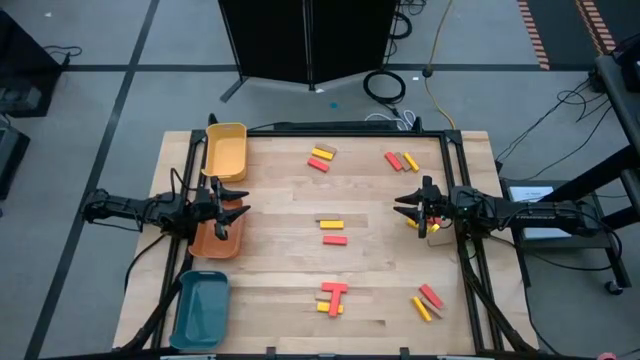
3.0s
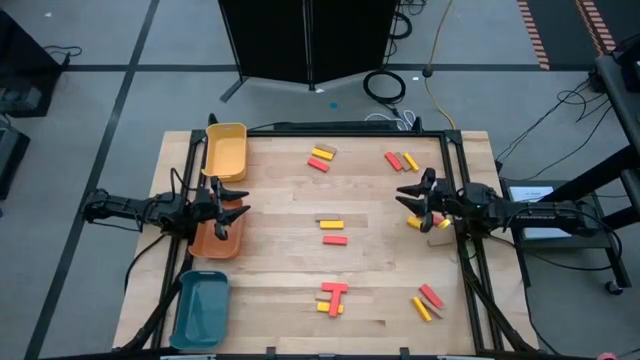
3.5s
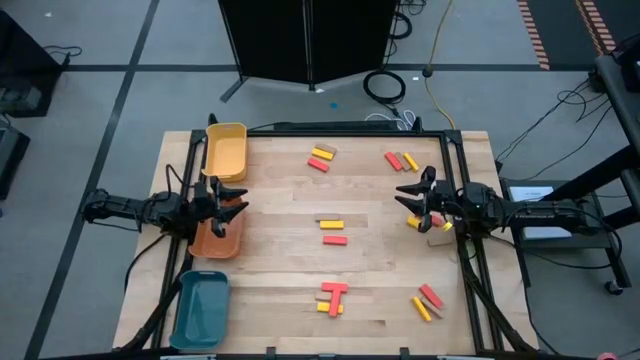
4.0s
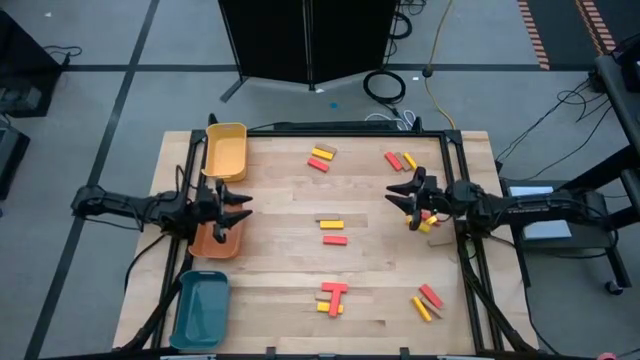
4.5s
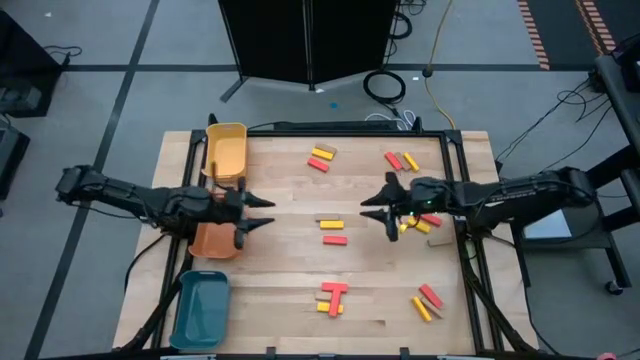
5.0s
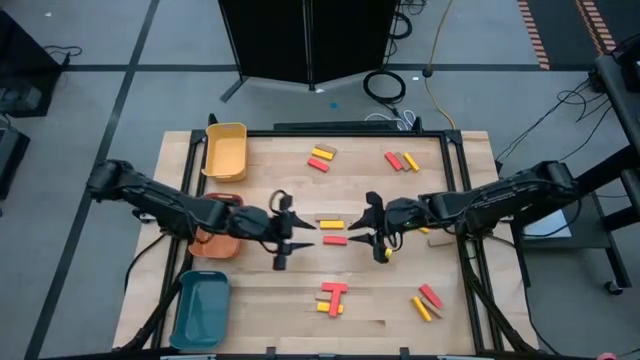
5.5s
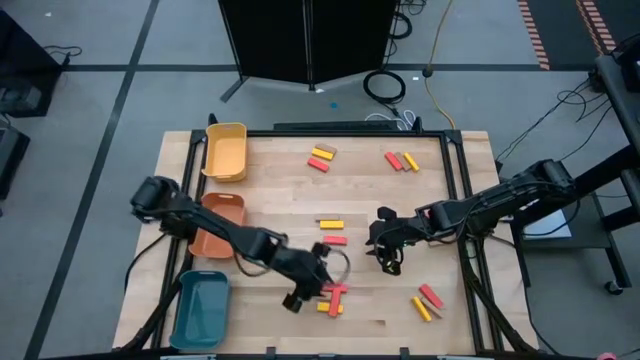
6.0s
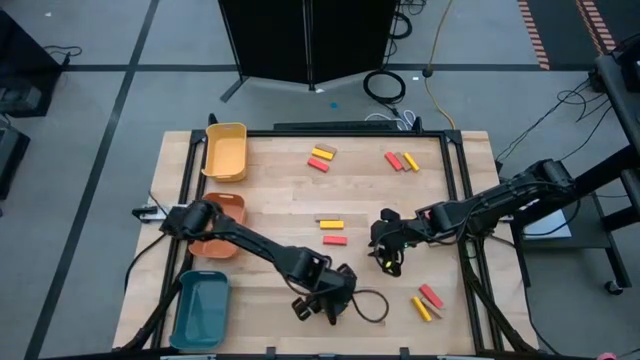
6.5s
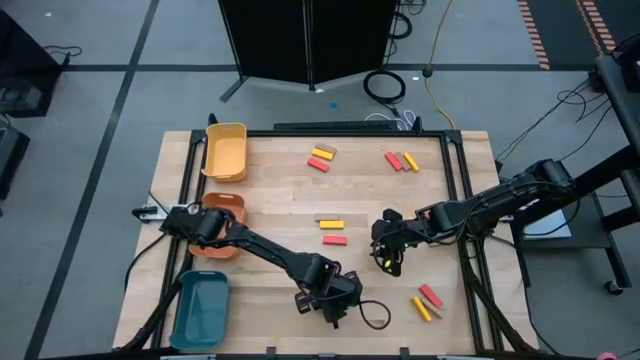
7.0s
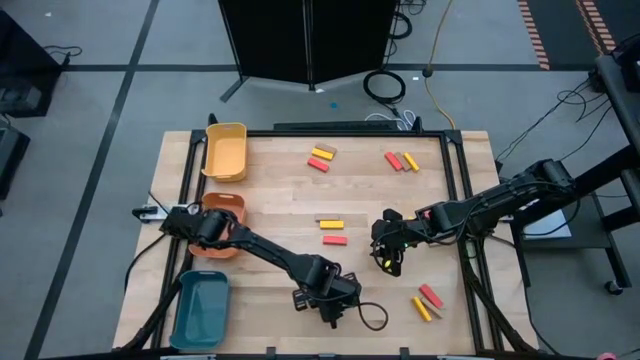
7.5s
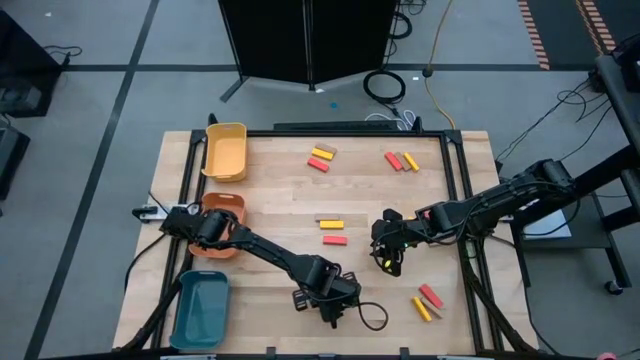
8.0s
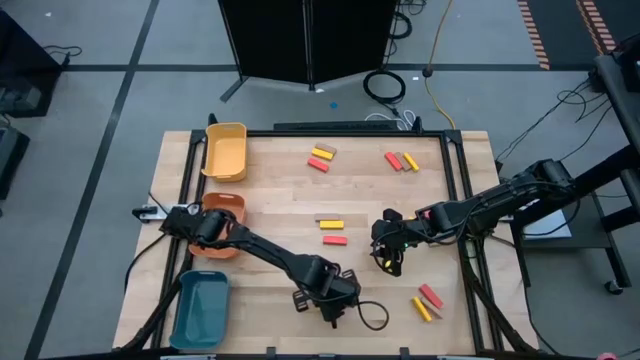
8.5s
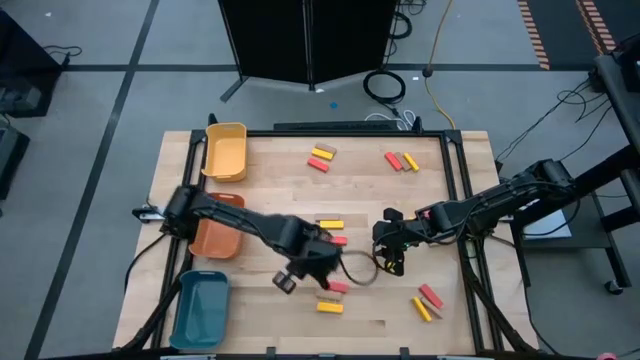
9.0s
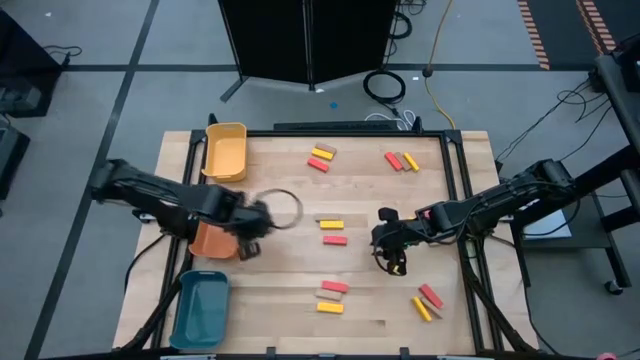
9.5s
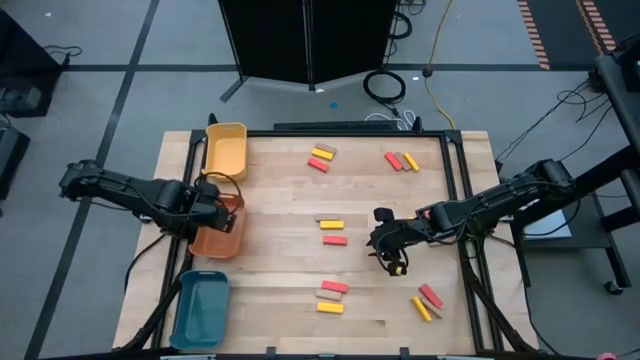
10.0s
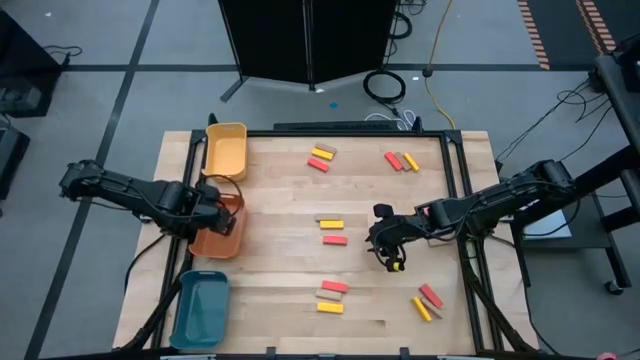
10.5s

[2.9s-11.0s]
Task: Sort blocks
Put the bottom left red block in the orange bin

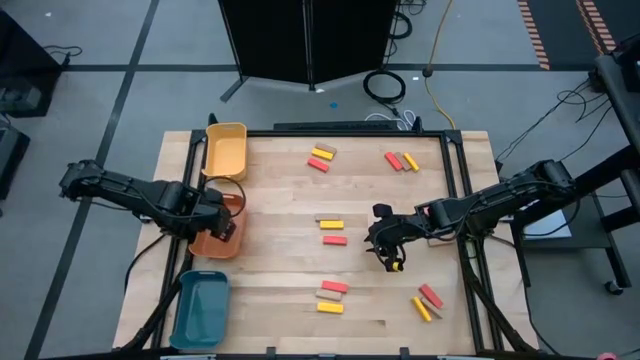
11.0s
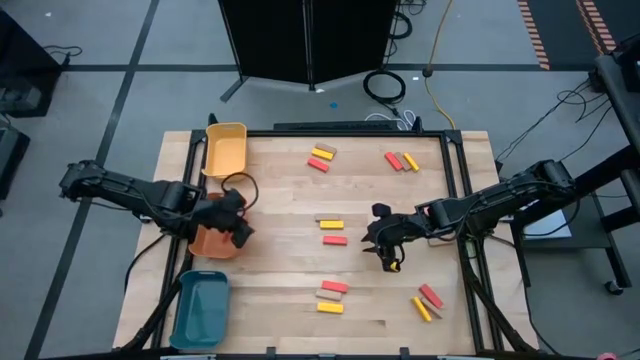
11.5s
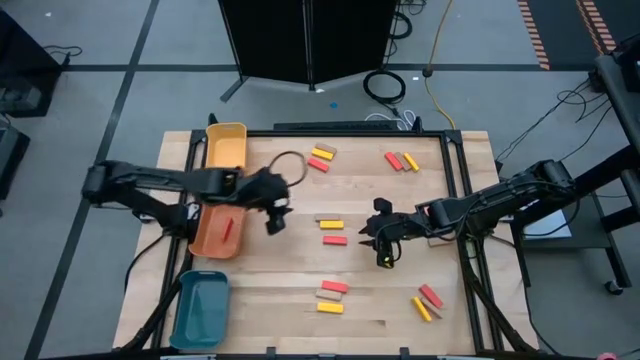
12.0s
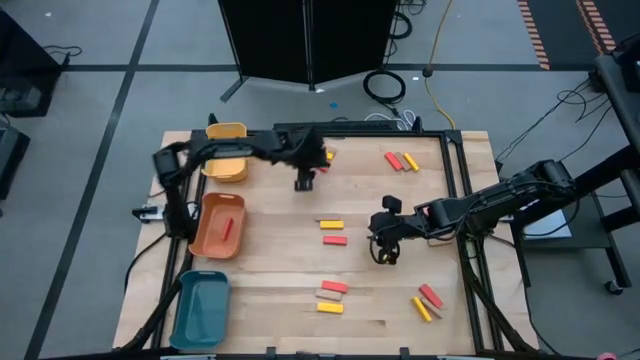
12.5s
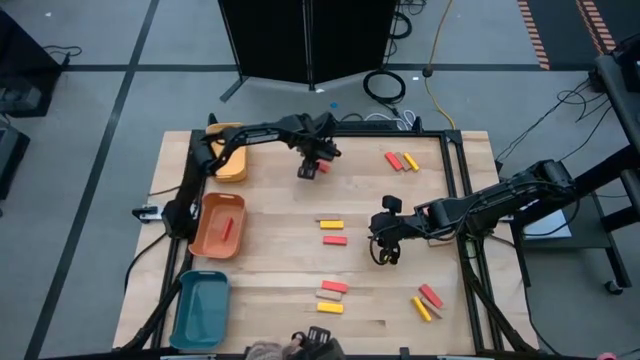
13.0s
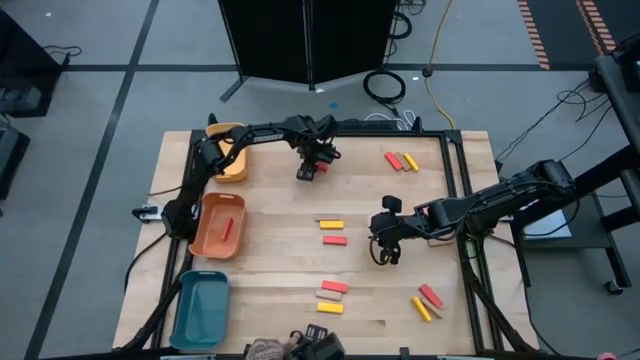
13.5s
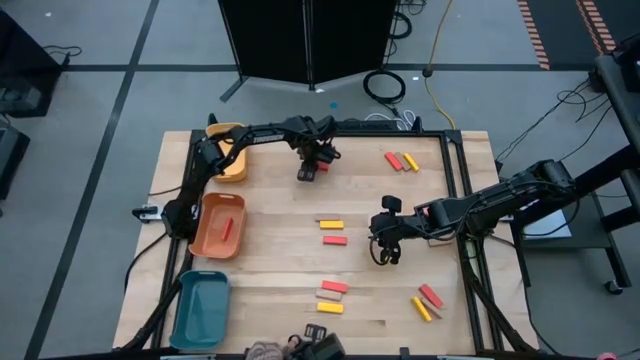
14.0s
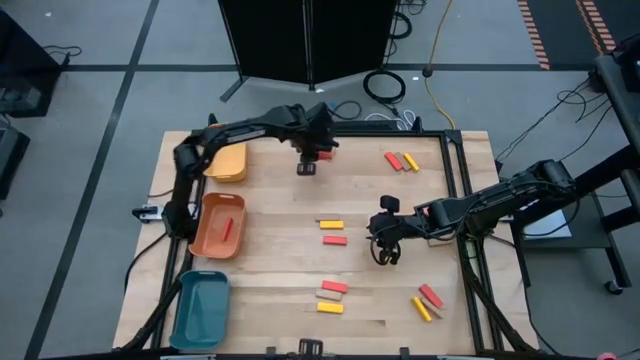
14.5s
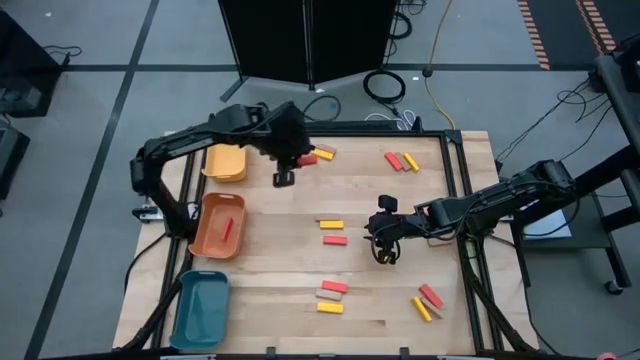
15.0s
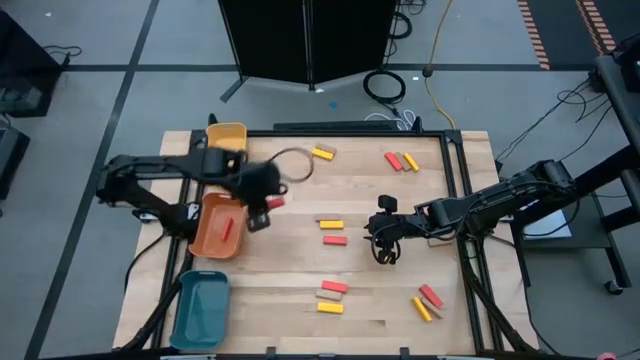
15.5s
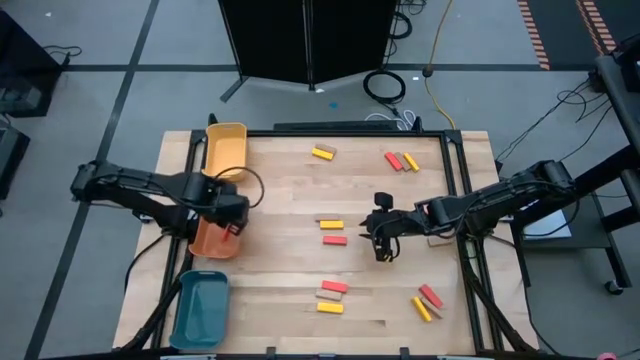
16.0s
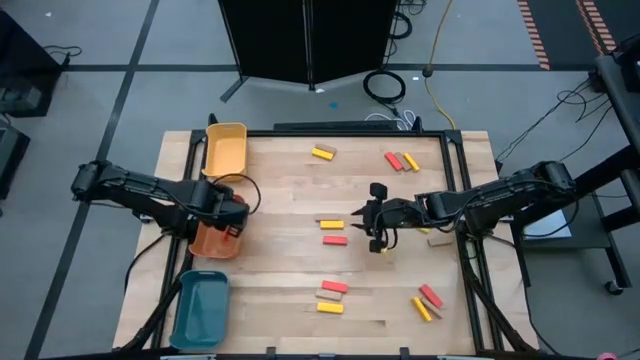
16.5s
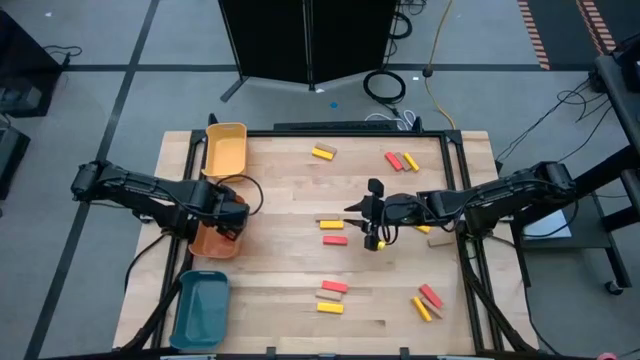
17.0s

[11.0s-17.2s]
Put the top left red block in the orange bin

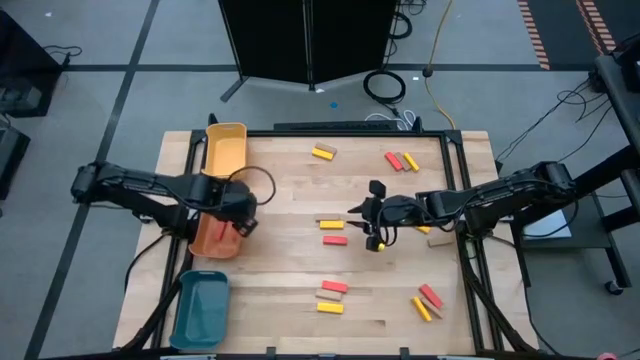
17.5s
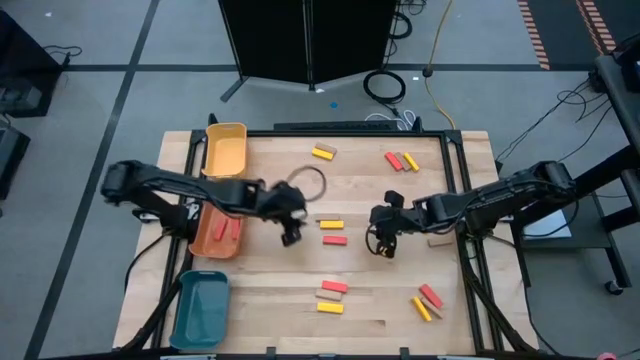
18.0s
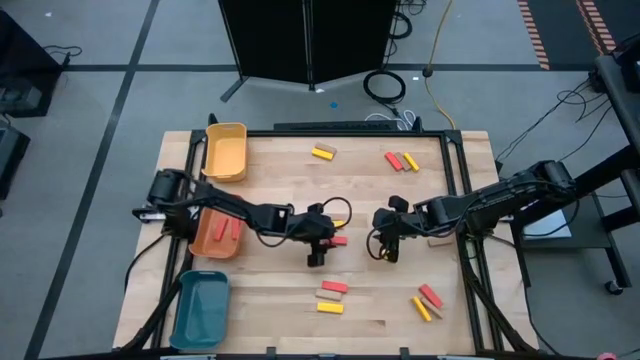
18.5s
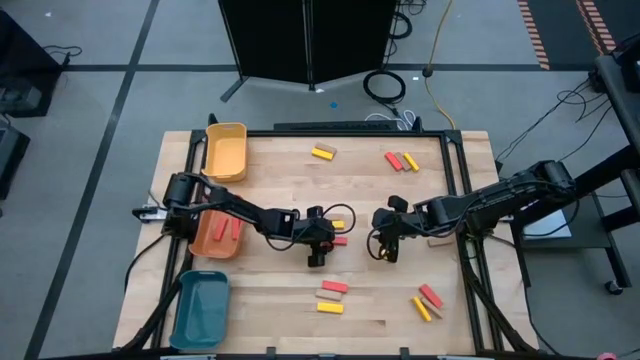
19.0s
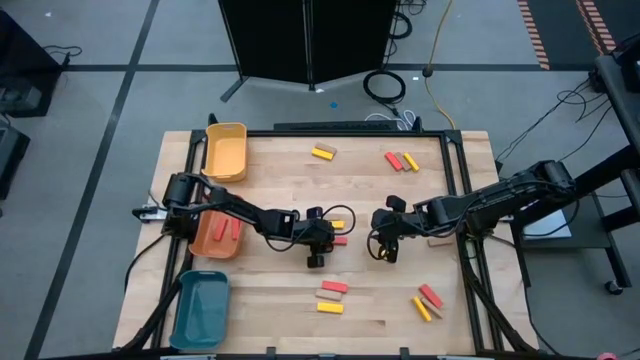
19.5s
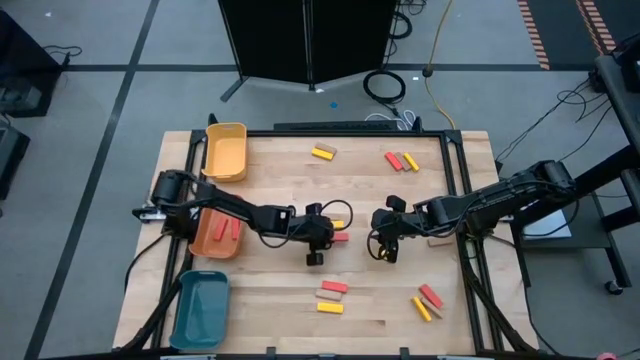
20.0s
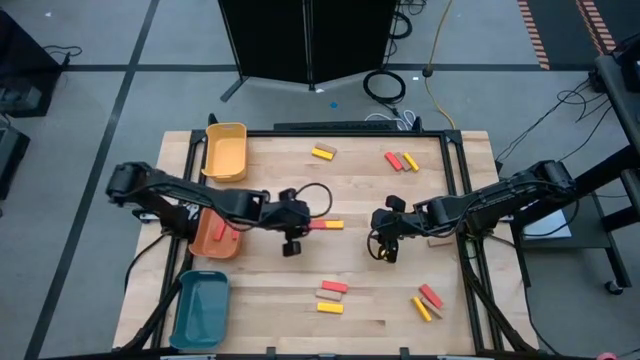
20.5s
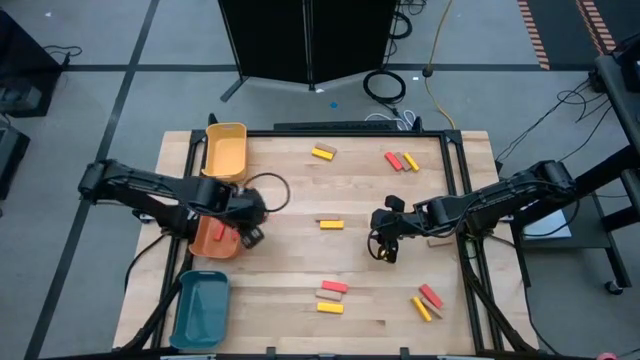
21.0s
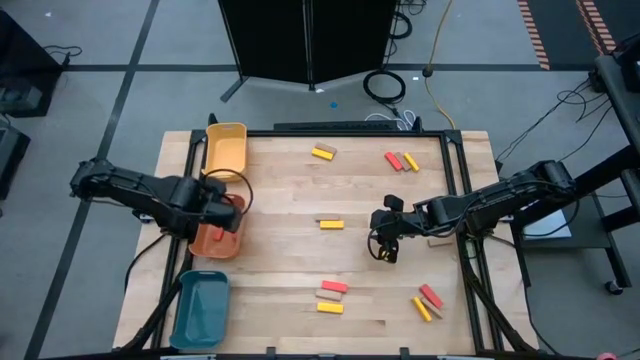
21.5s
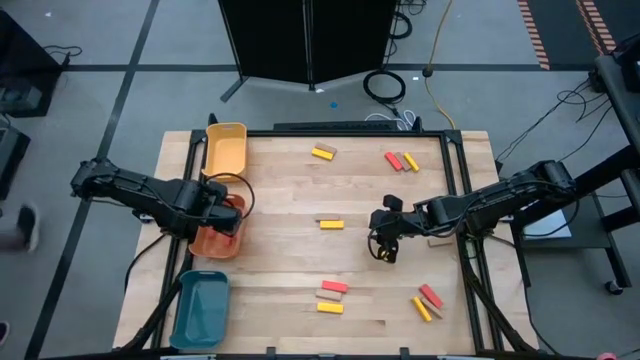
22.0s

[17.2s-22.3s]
Put the middle left red block in the orange bin

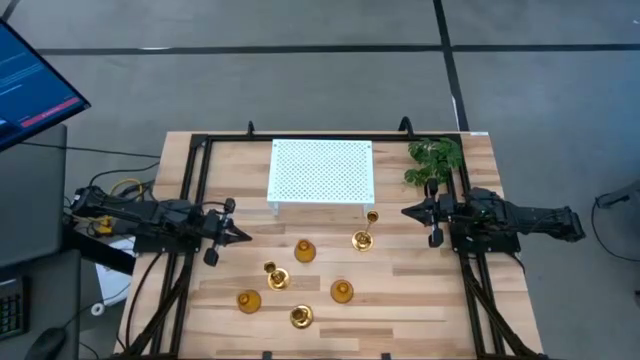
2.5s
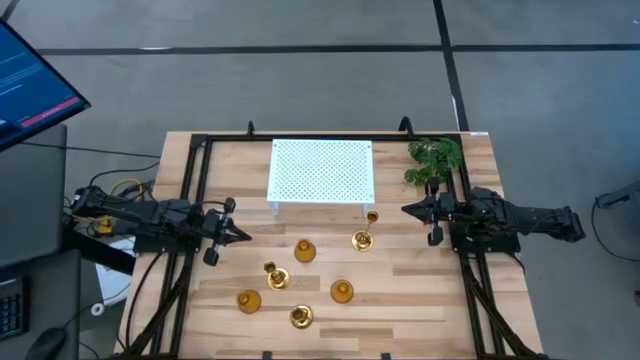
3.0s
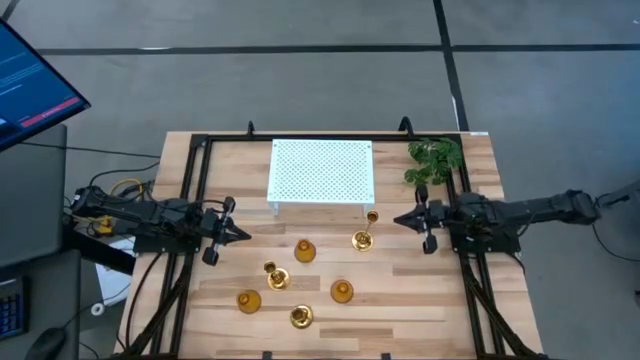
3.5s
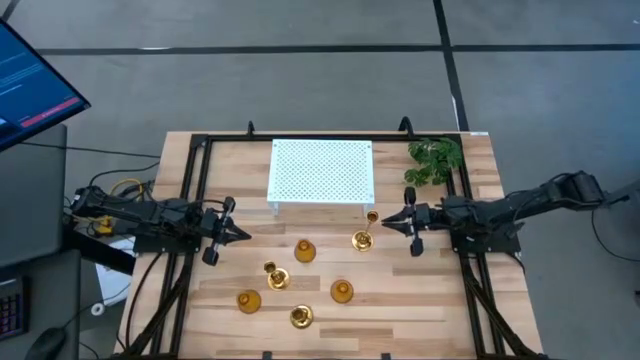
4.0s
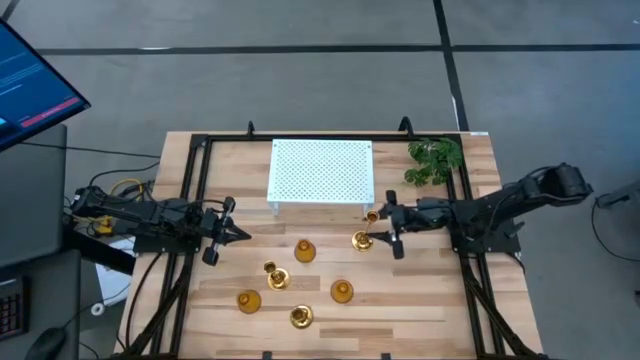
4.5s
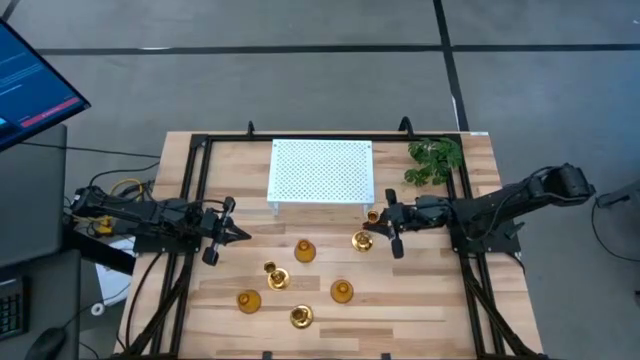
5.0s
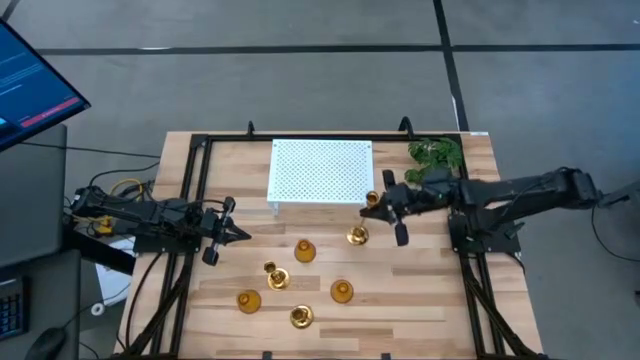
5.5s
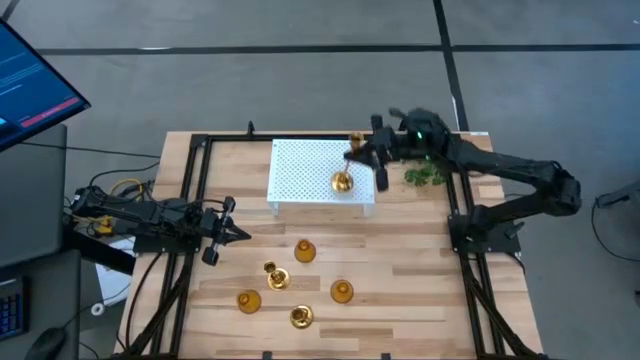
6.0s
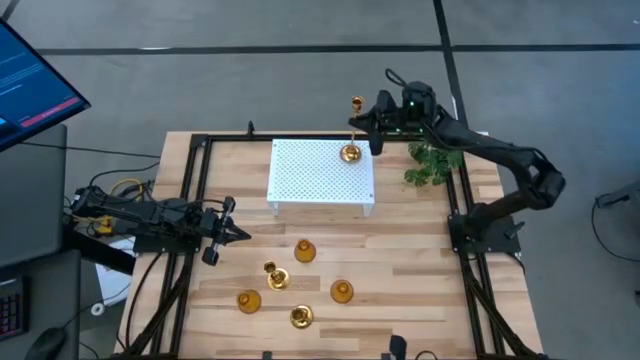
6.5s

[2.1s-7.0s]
Task: Pick & Place candle stick holders
Put the top gold candle holder on the shelf
